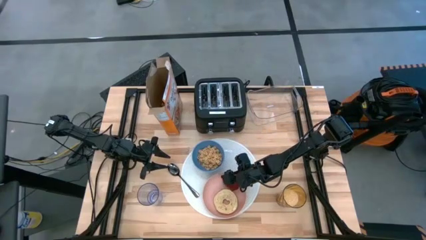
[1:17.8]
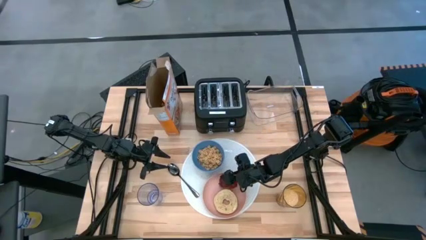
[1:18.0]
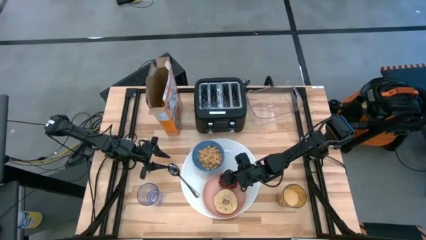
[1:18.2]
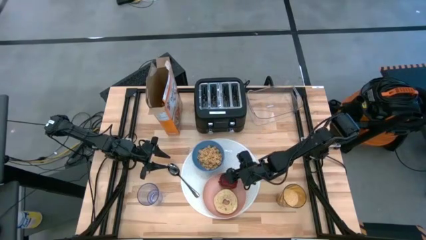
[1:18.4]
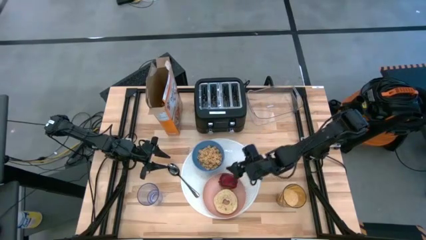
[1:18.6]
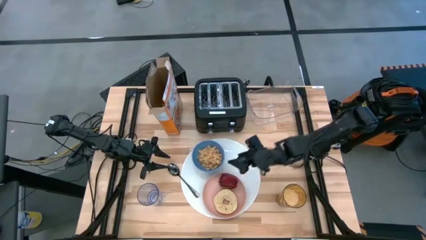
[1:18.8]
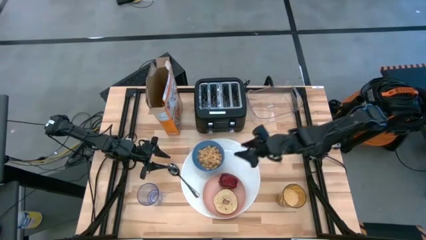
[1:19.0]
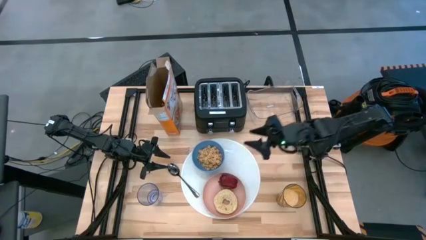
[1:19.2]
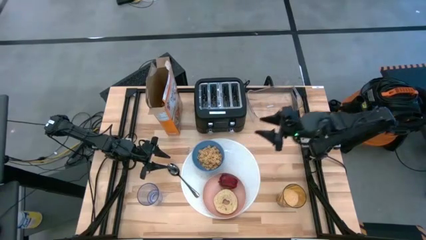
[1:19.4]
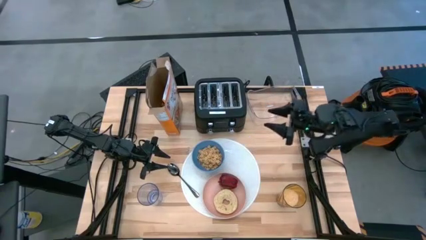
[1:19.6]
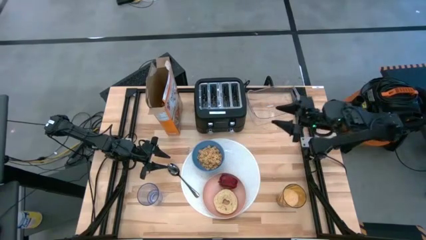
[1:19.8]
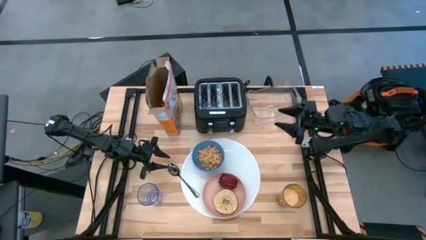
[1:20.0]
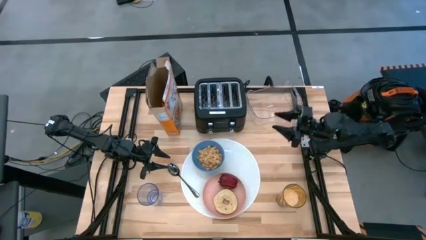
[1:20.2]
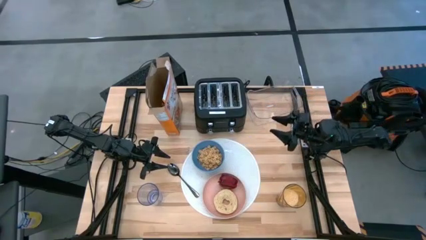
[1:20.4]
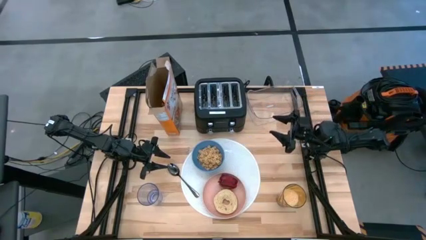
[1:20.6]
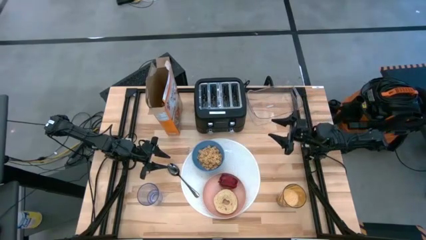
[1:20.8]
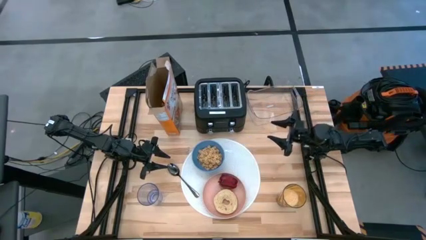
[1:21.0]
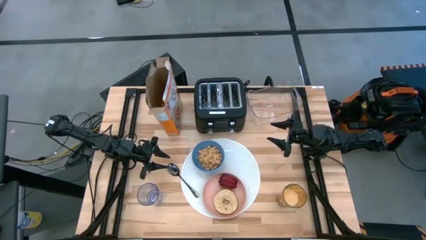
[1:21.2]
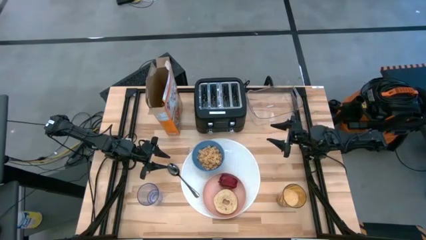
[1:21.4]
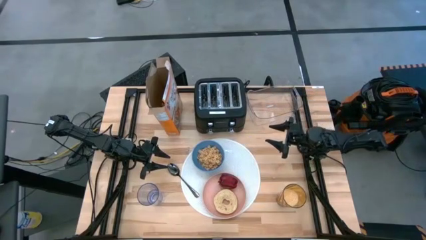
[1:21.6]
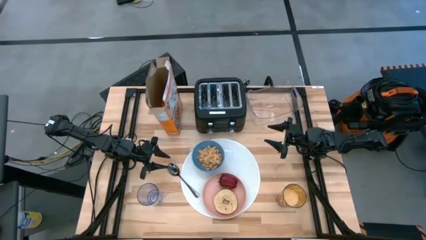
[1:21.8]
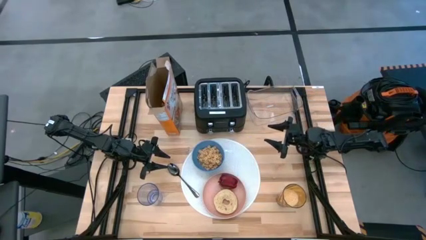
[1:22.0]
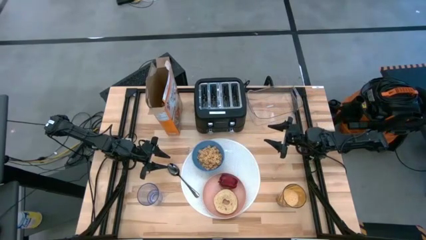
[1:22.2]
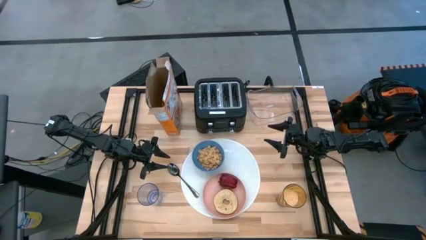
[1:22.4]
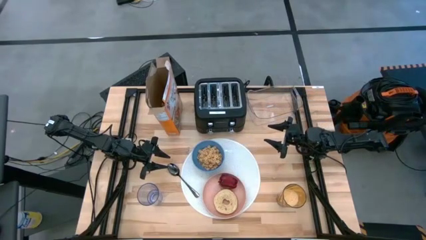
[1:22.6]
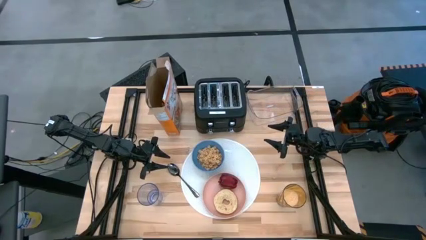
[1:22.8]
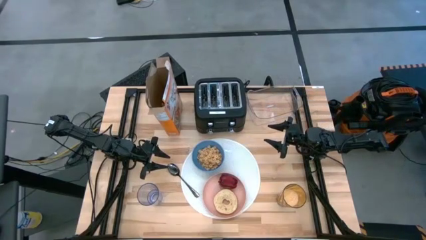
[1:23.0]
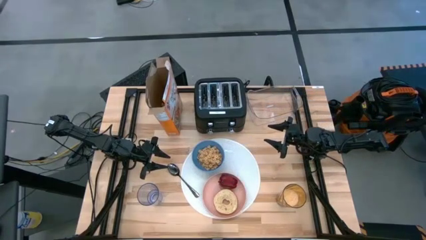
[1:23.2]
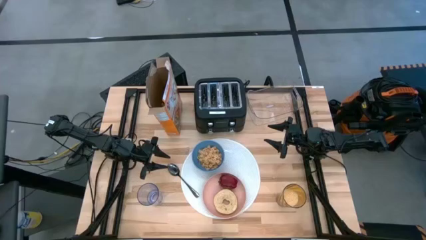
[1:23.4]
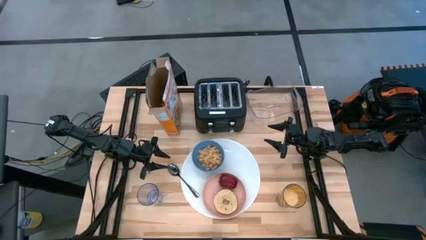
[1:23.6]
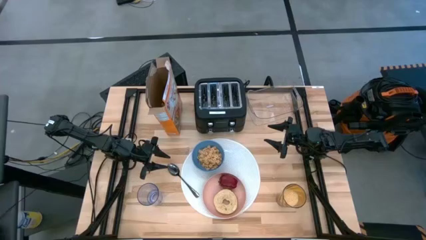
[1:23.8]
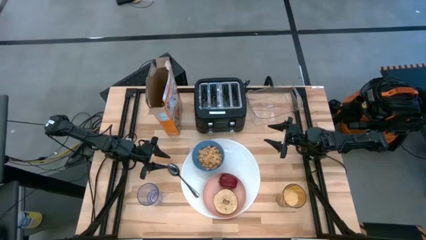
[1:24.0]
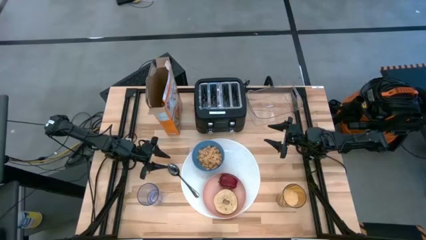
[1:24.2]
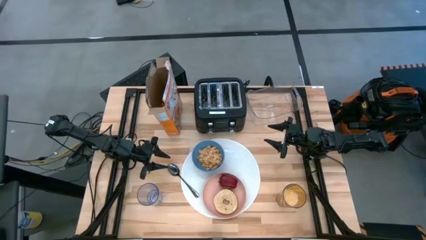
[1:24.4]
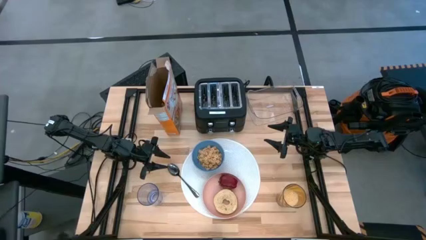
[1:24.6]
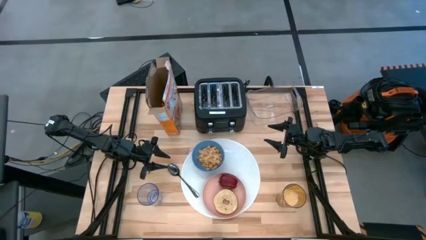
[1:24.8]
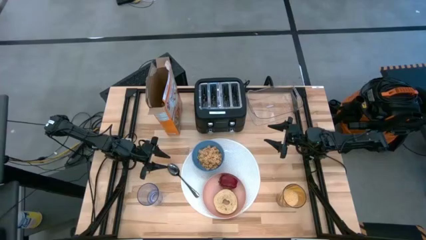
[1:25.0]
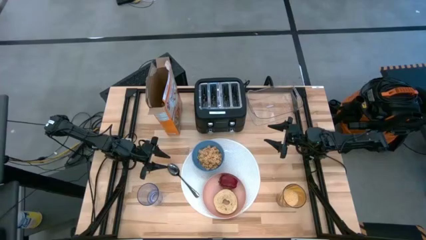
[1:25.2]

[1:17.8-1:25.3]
Task: Arrange a breakfast setting
Return to Home Position

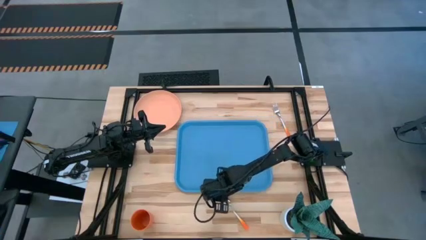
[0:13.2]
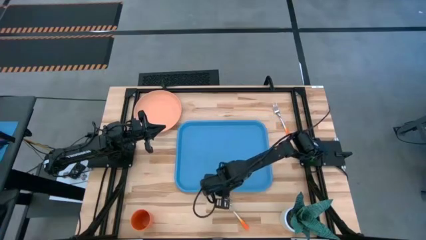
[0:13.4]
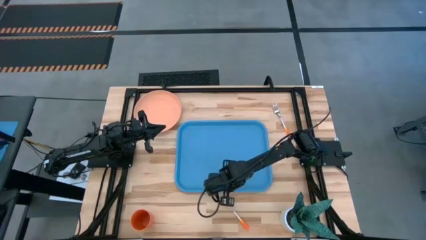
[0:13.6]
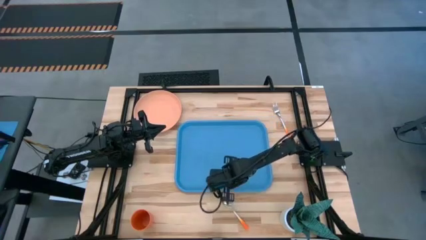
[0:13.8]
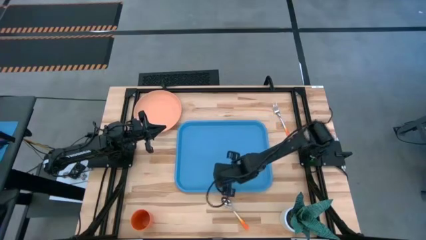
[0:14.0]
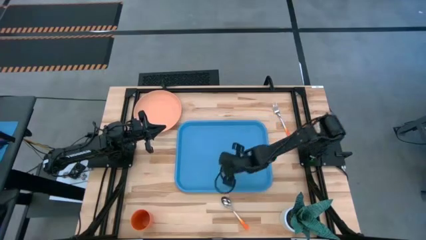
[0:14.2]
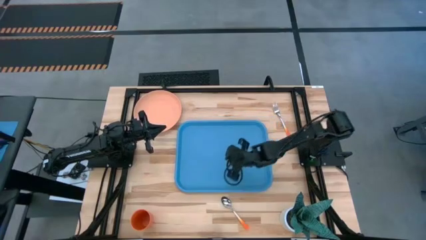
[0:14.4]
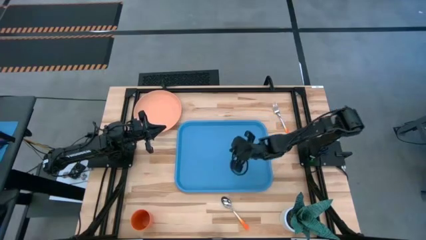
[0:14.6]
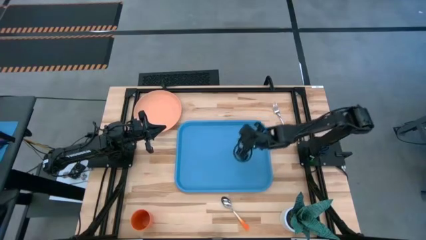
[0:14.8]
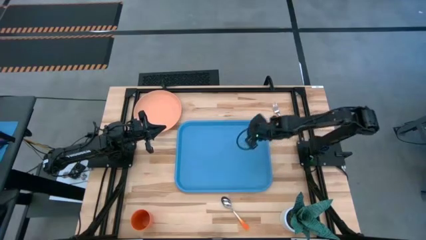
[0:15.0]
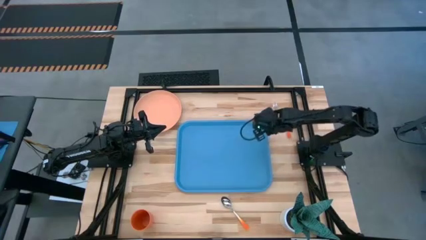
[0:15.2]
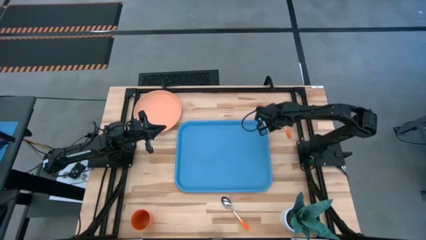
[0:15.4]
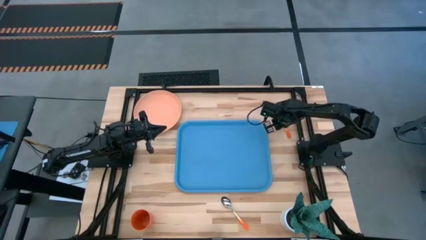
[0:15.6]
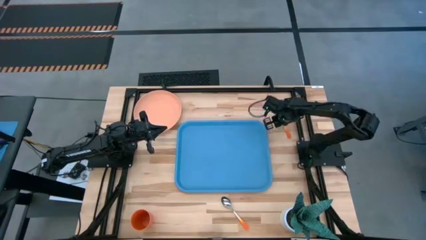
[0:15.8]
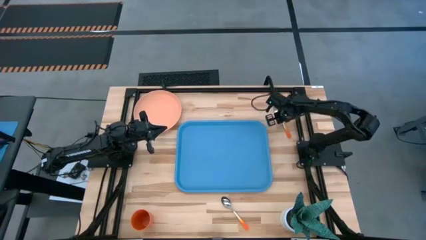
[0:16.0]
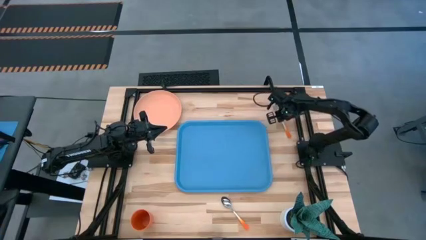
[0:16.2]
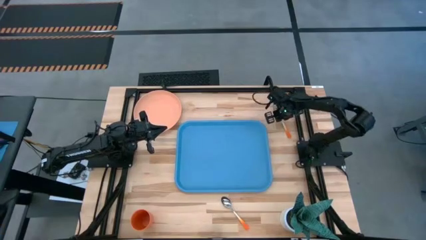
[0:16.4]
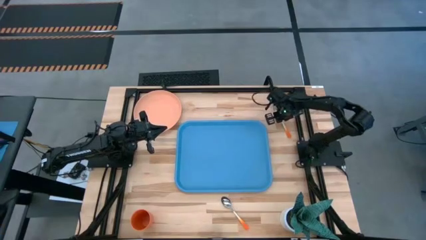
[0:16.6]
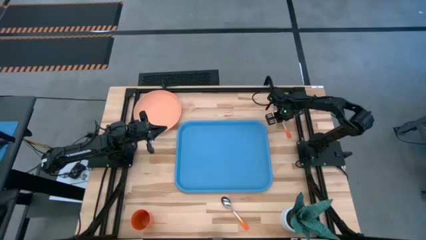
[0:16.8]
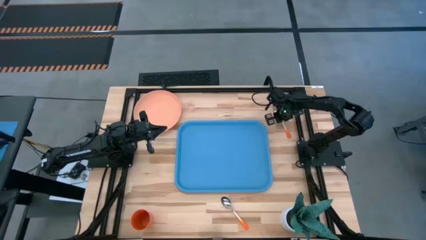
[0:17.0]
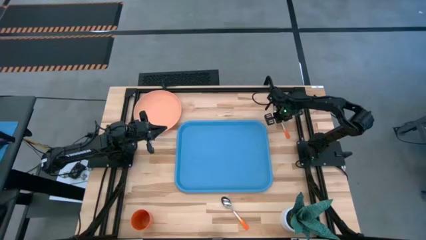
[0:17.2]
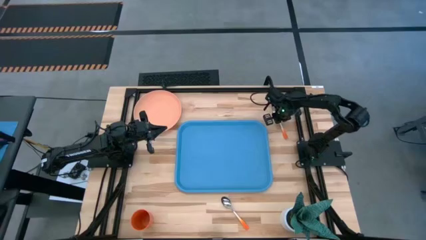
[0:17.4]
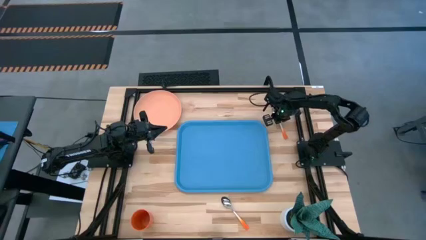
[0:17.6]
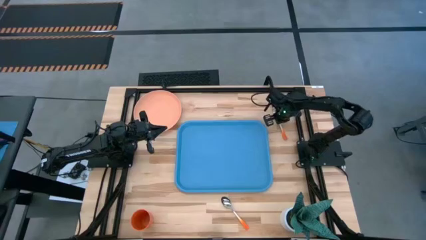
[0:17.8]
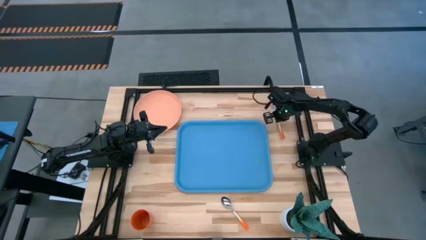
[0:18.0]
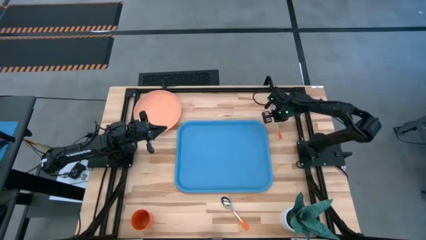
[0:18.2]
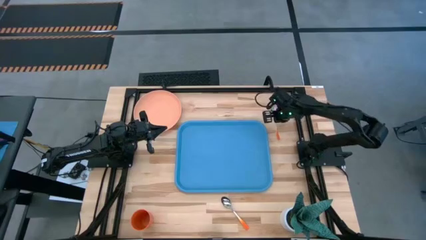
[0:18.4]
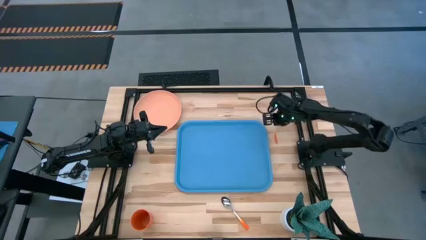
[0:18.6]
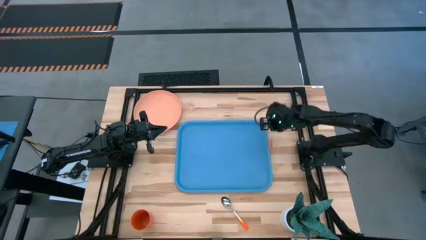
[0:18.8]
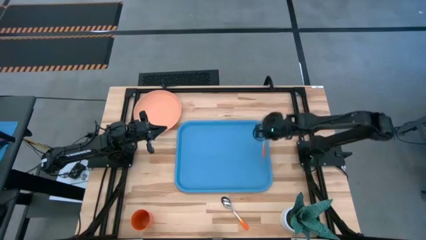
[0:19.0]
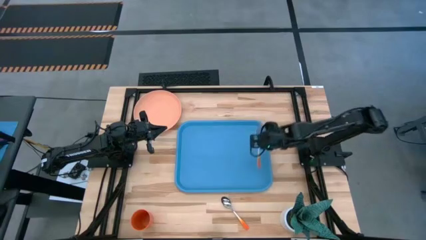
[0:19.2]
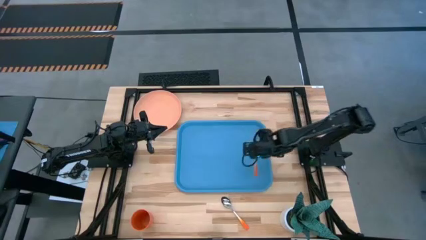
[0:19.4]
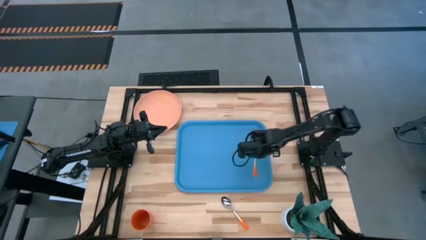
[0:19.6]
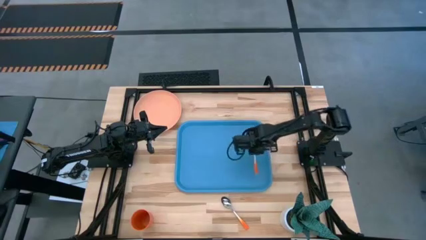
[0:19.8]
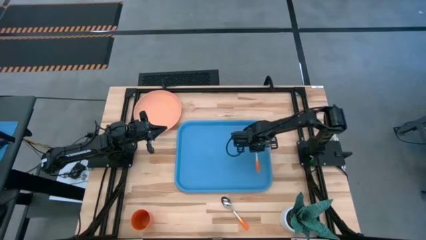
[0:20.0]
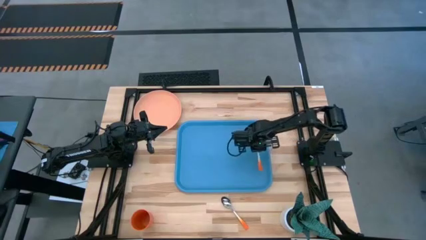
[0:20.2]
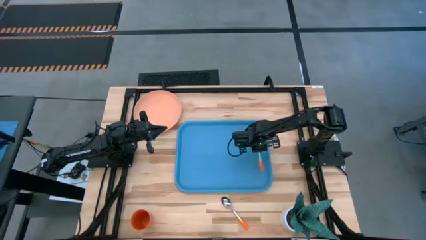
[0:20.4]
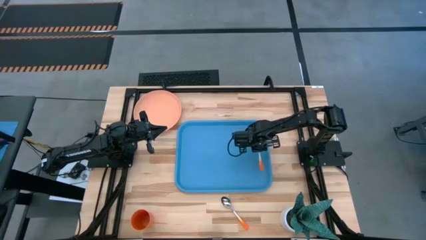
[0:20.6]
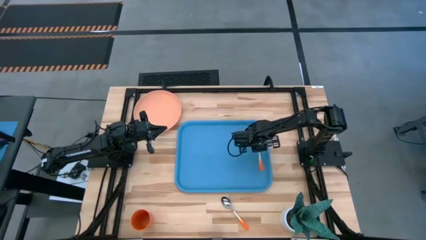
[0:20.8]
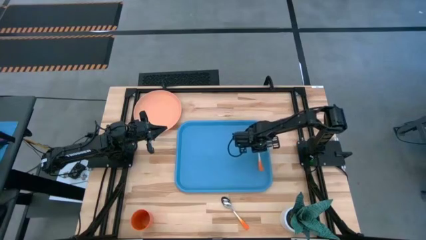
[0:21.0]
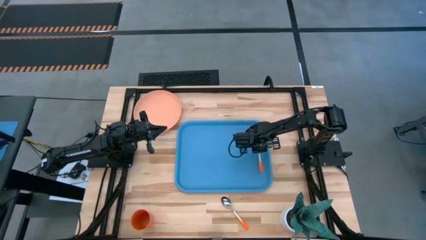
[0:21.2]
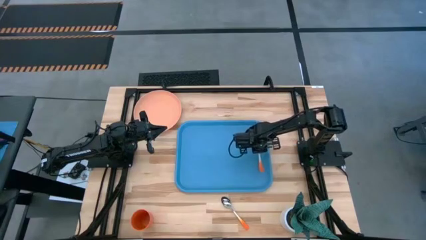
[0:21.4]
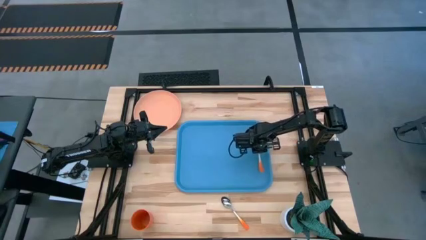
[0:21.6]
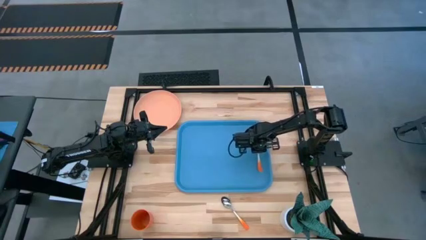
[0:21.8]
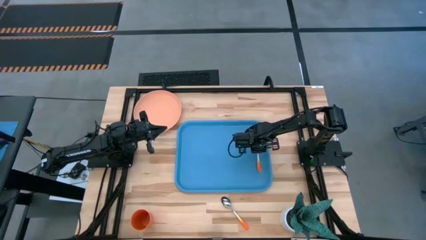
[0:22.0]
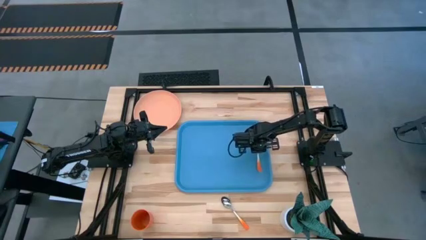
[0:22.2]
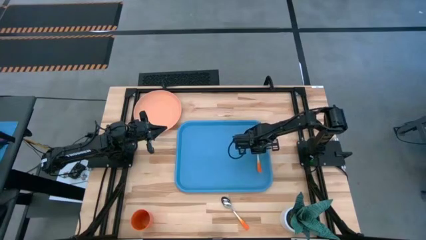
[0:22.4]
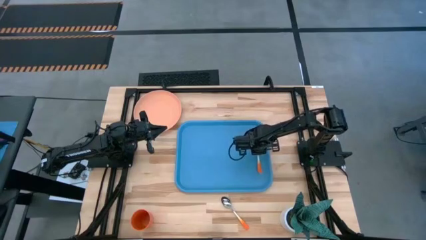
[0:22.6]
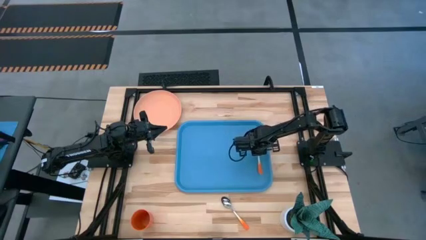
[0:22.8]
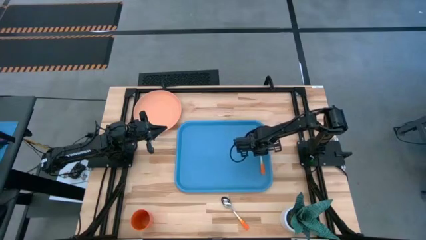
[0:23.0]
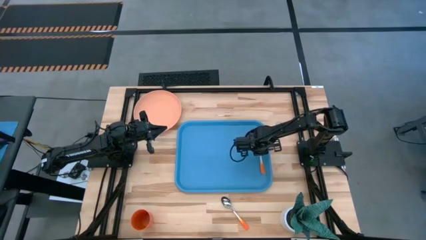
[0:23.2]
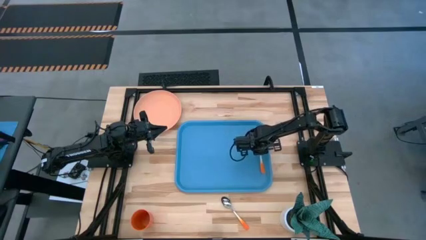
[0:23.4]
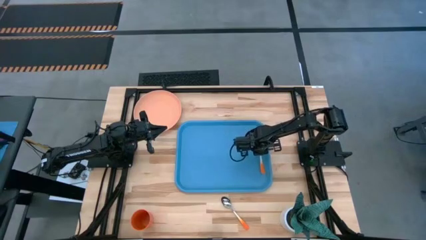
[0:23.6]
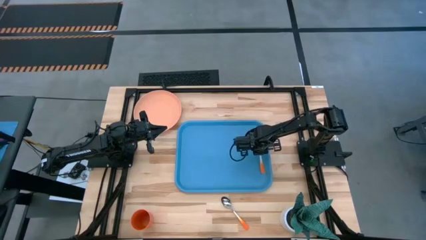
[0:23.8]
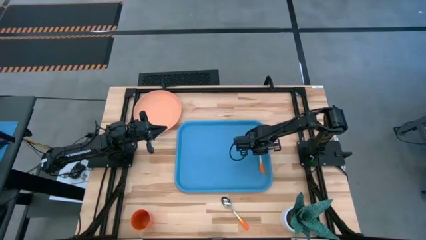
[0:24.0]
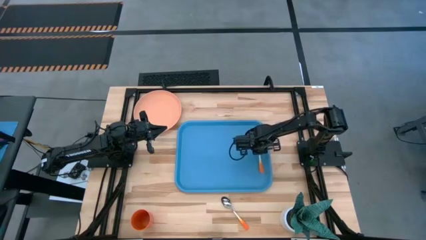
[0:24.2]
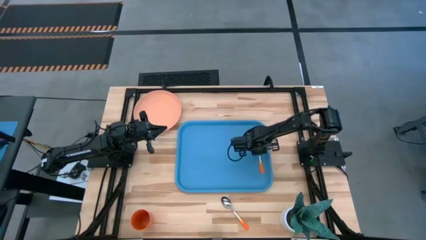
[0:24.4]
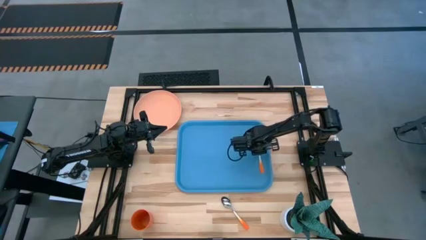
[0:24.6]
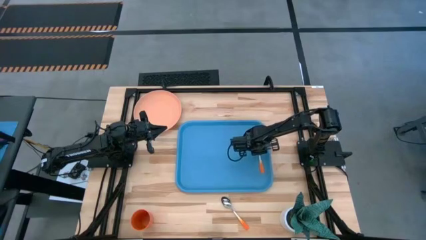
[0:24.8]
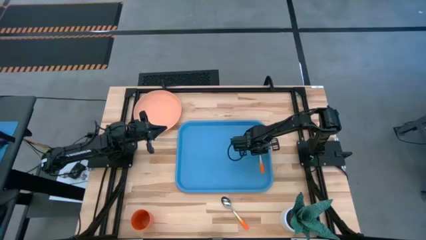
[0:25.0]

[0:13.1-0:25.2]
Task: Pick and place plate/cup/fork/spoon on tray
Put the orange fork on the blue serving tray
